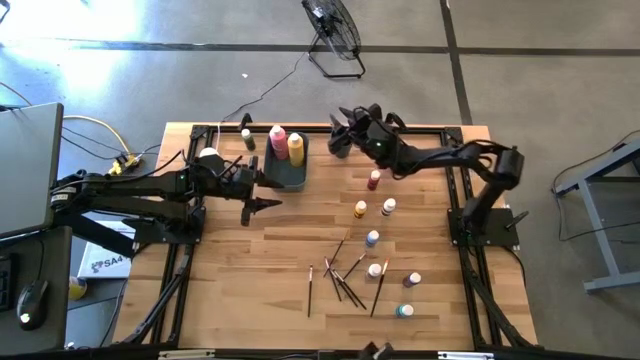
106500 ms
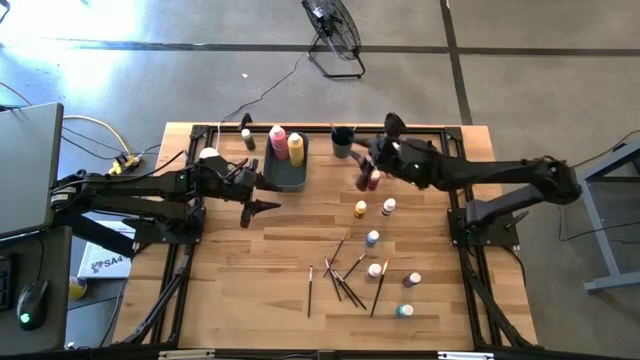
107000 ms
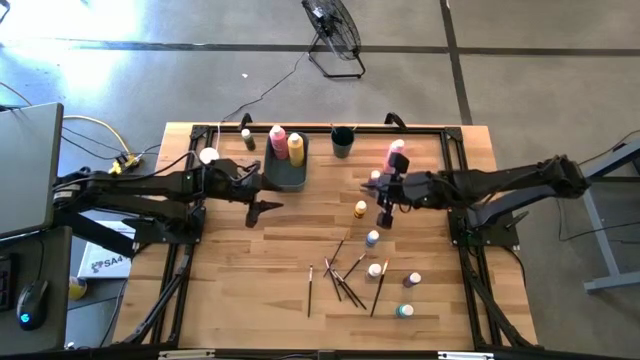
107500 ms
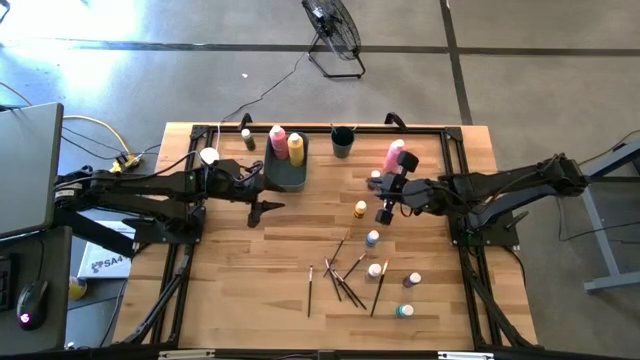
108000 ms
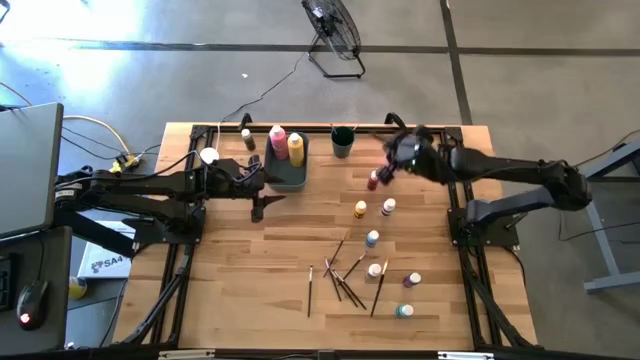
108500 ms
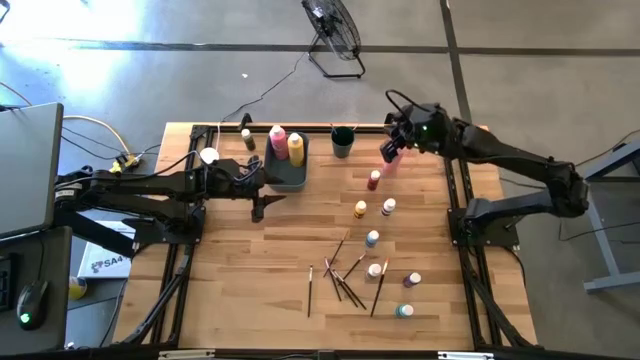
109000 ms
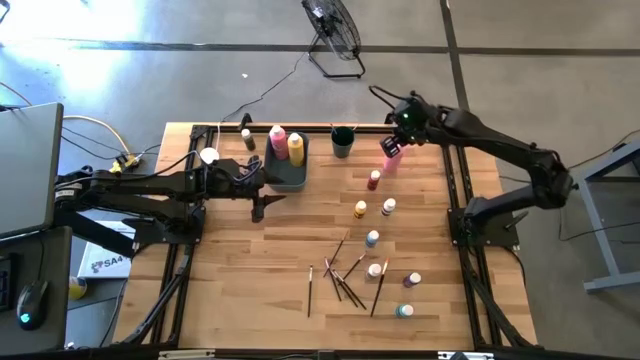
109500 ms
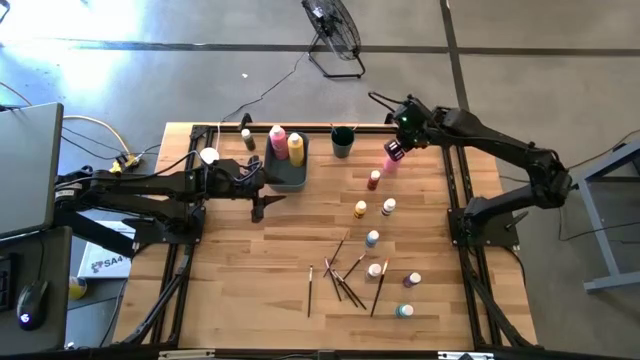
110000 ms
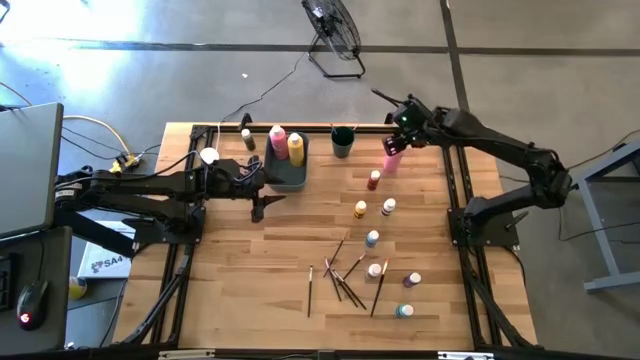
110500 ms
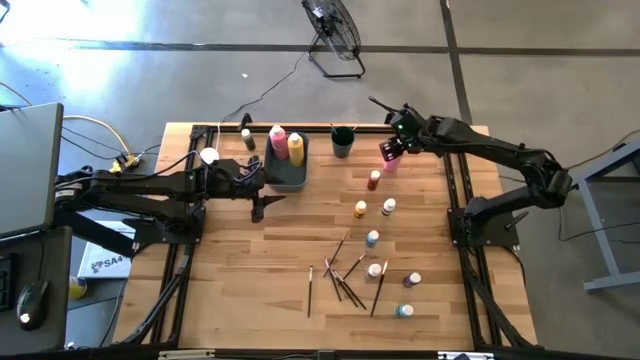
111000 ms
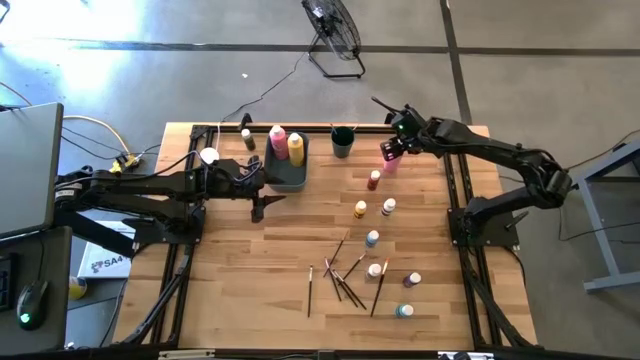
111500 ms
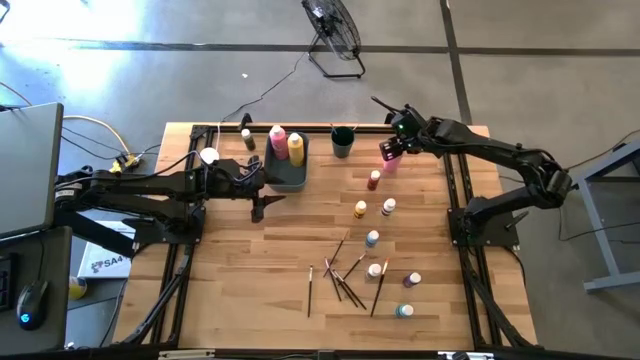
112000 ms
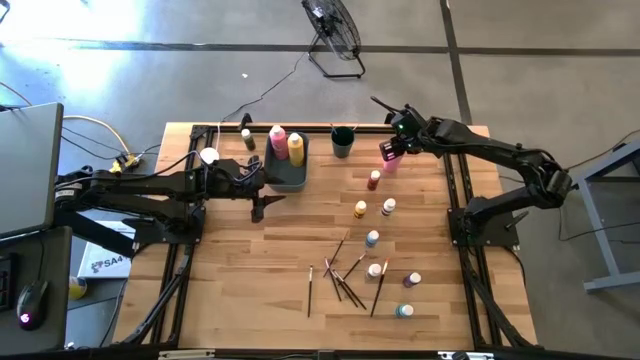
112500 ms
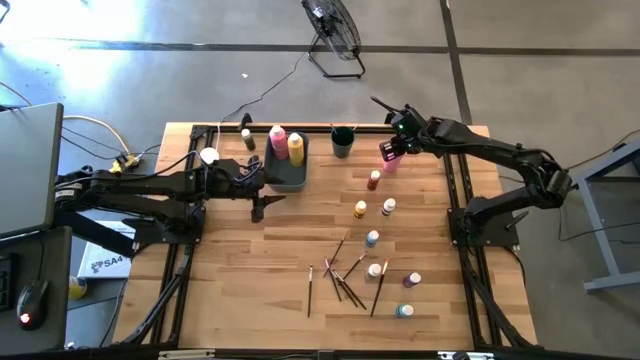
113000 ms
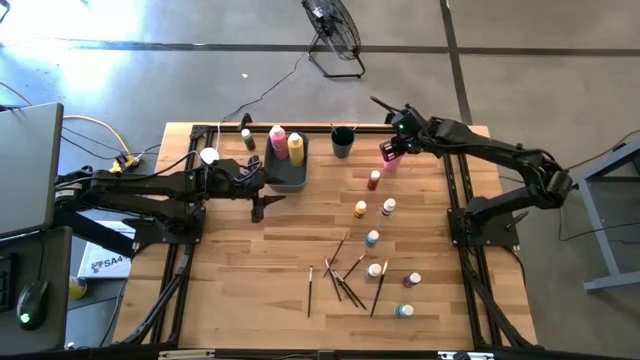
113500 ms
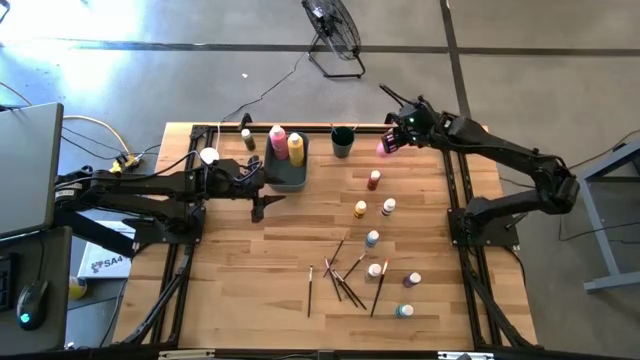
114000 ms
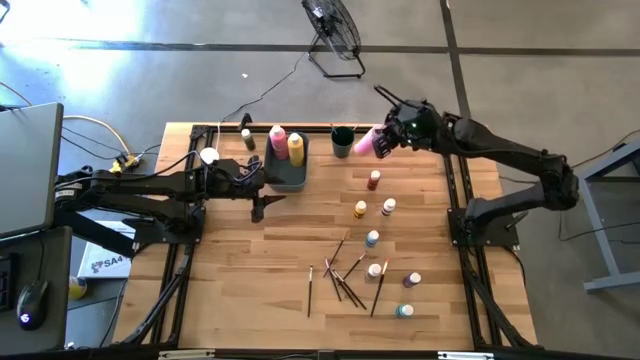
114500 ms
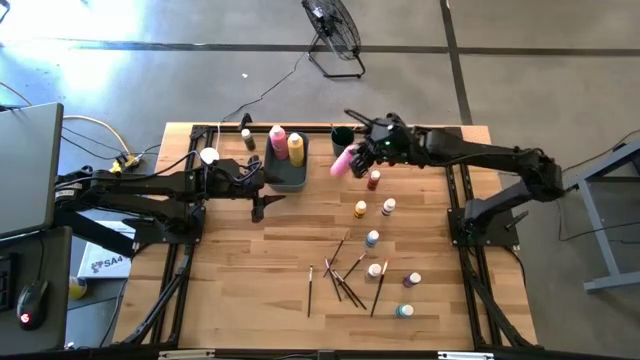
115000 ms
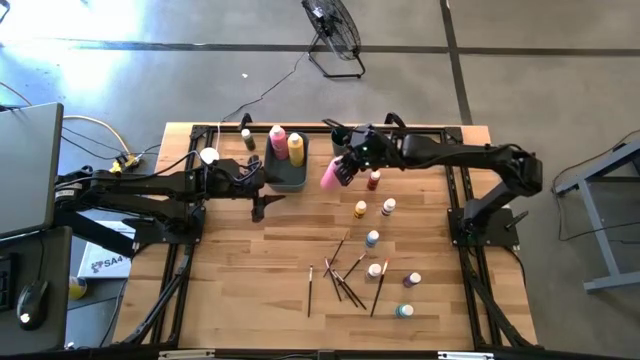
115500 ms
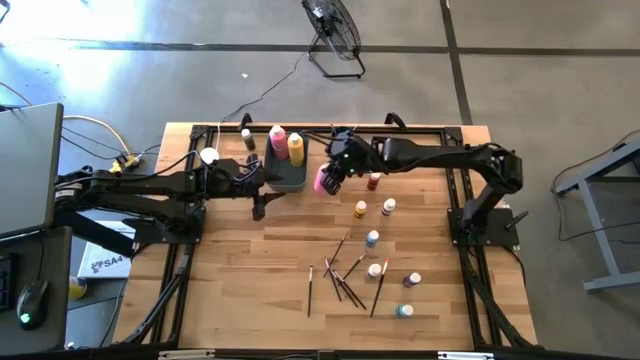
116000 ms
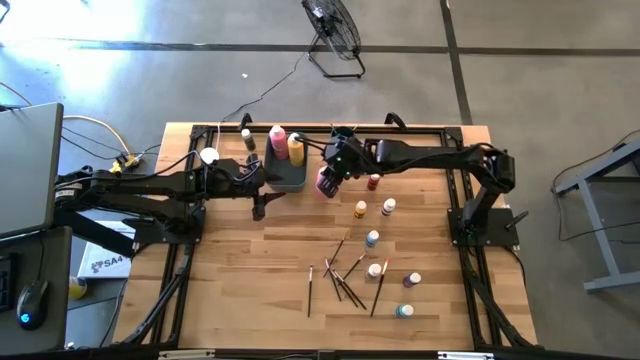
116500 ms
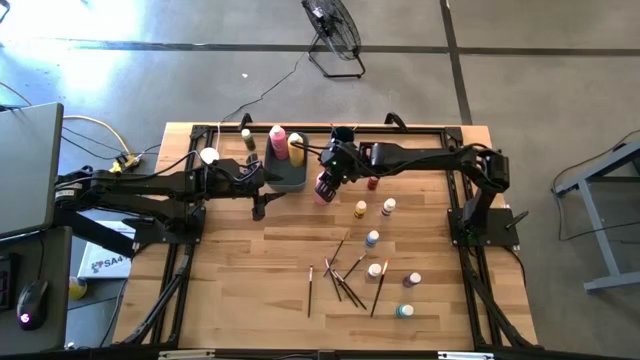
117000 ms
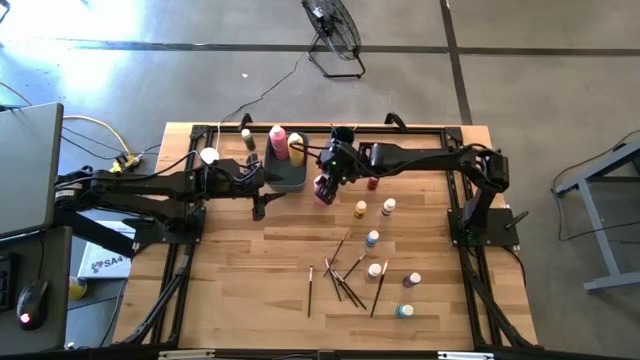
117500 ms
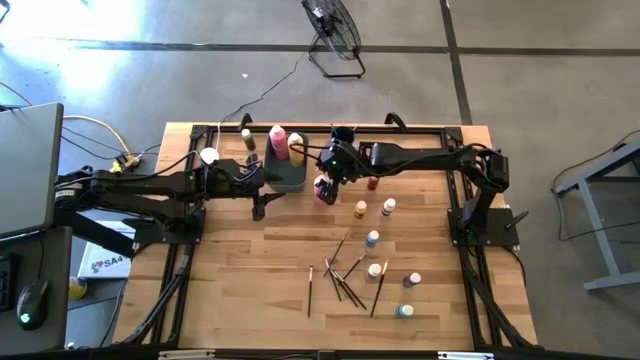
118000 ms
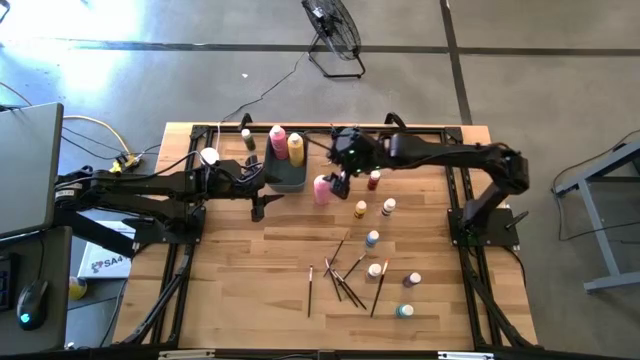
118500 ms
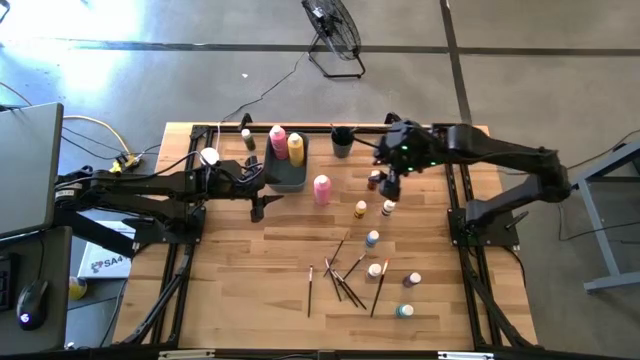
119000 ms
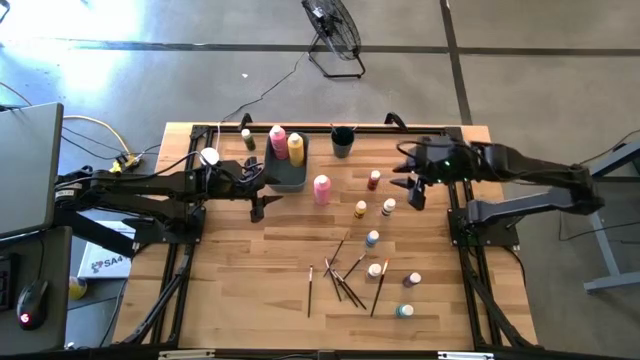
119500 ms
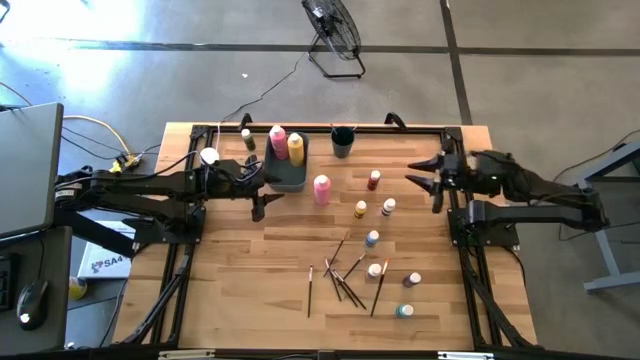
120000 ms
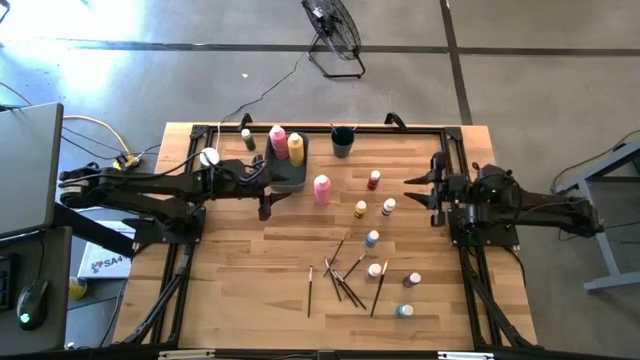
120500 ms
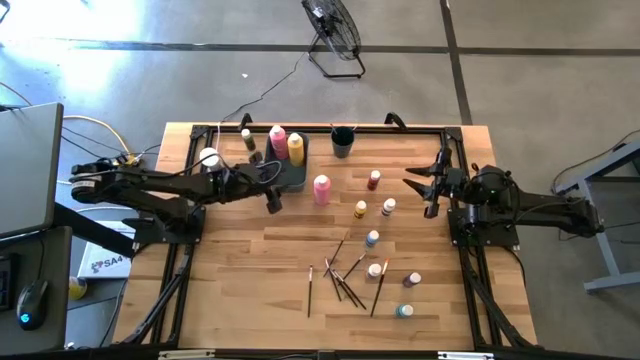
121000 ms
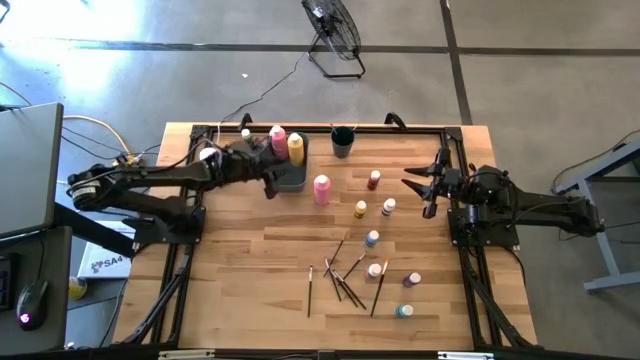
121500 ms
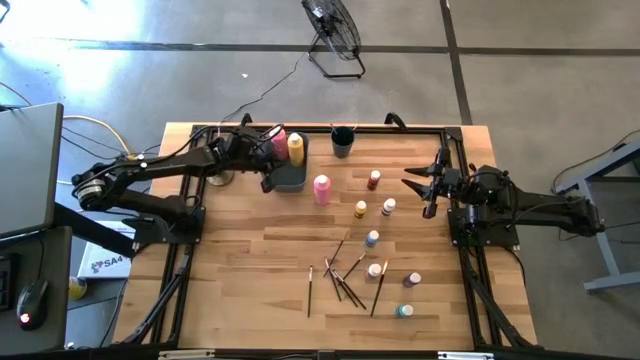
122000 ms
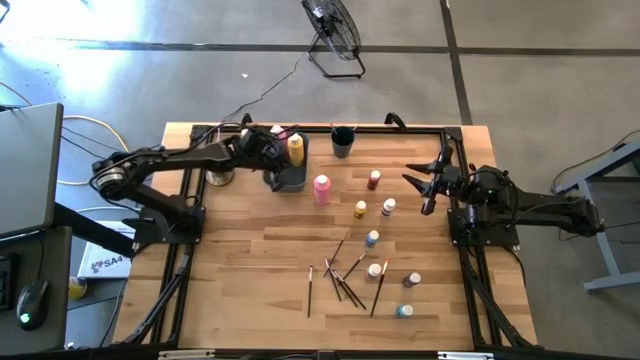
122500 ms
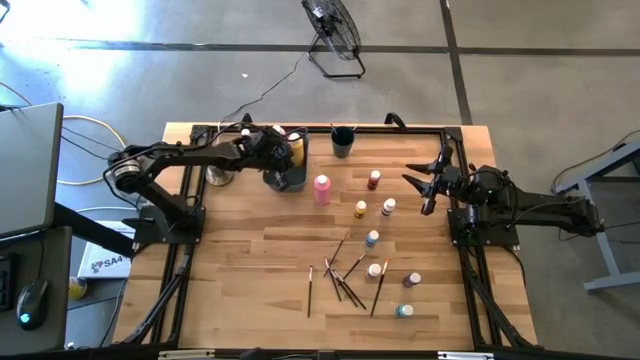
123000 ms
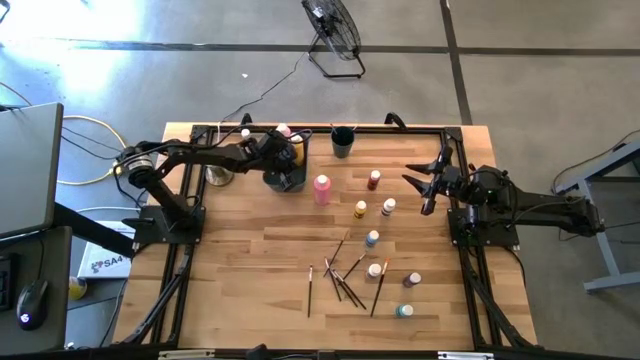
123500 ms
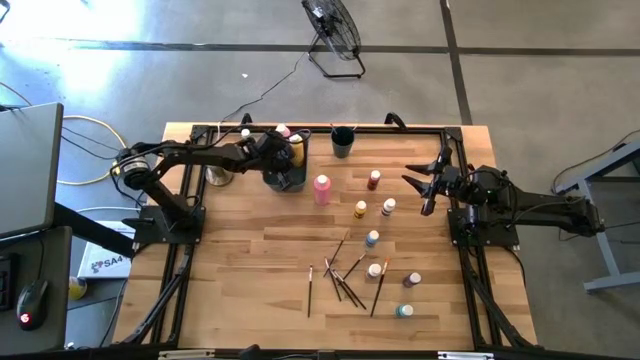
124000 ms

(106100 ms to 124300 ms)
Task: Pick & Place Paint Supplies
Put the large pink paint bottle into the green bin
